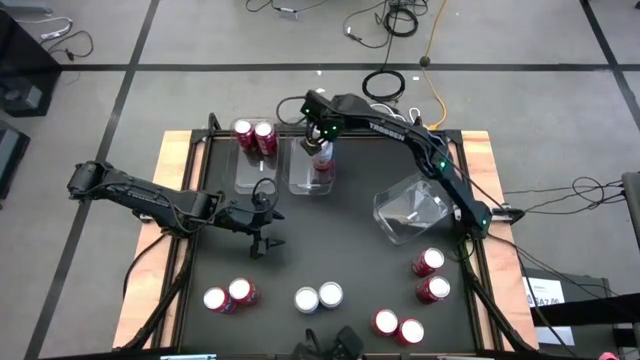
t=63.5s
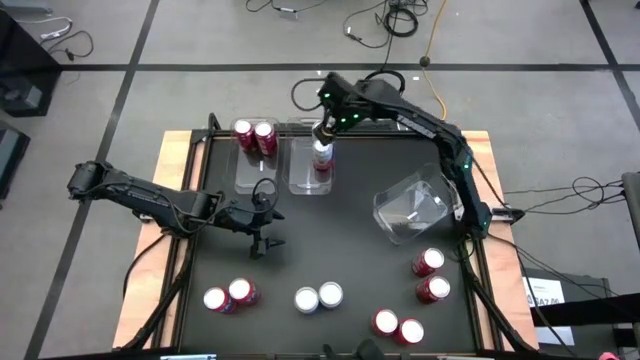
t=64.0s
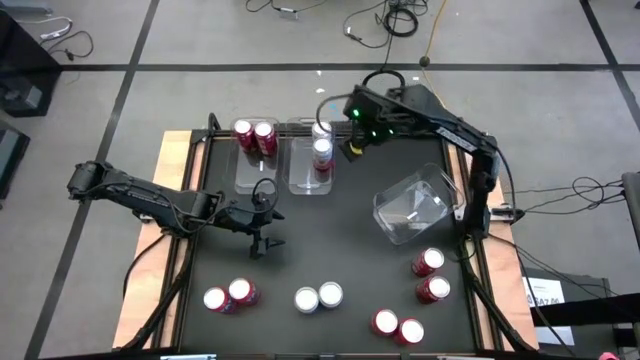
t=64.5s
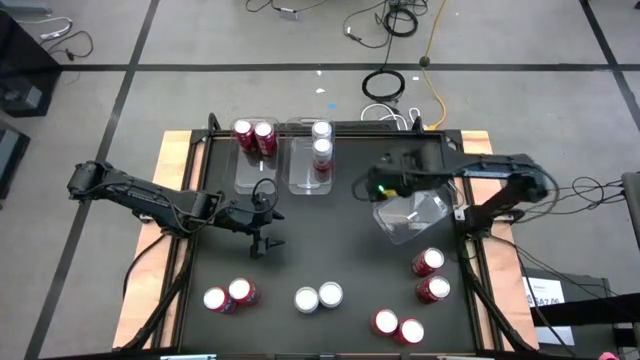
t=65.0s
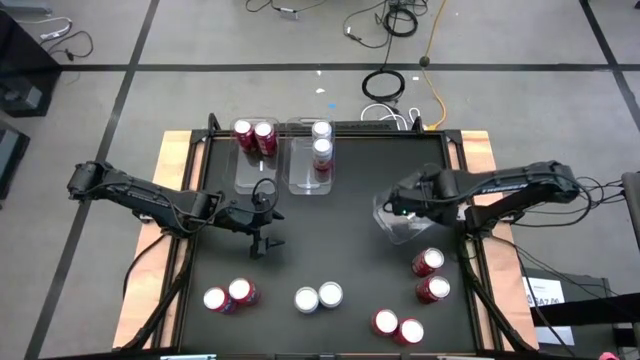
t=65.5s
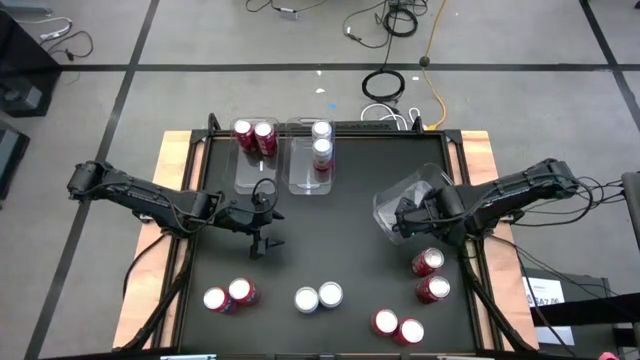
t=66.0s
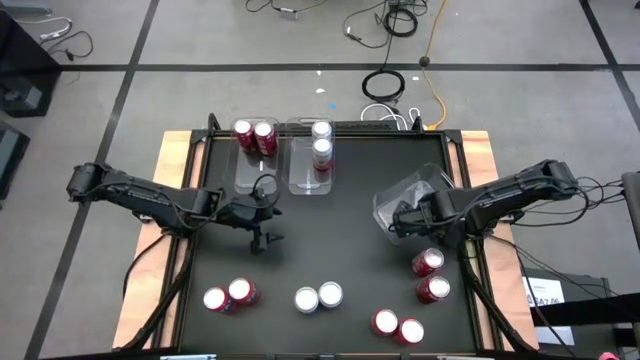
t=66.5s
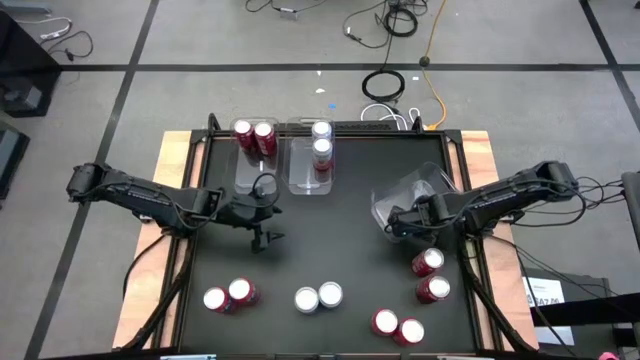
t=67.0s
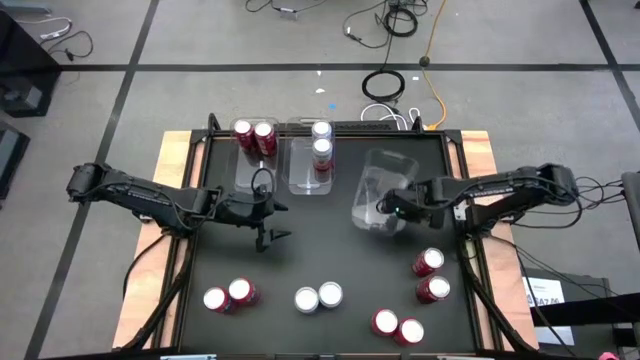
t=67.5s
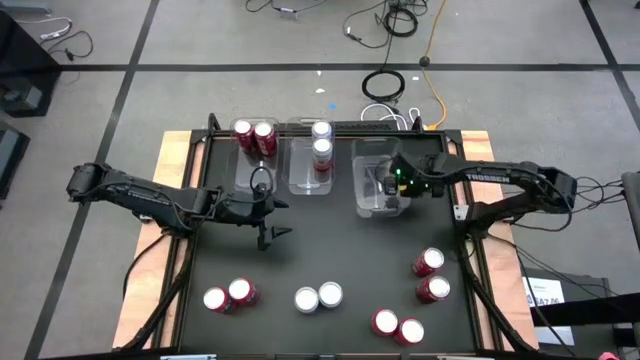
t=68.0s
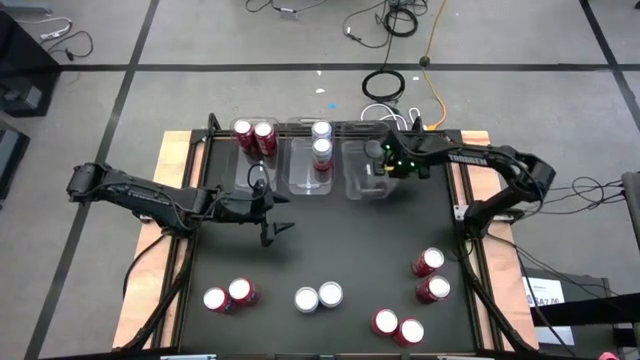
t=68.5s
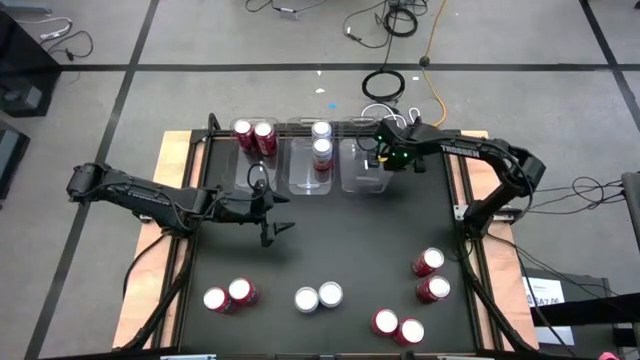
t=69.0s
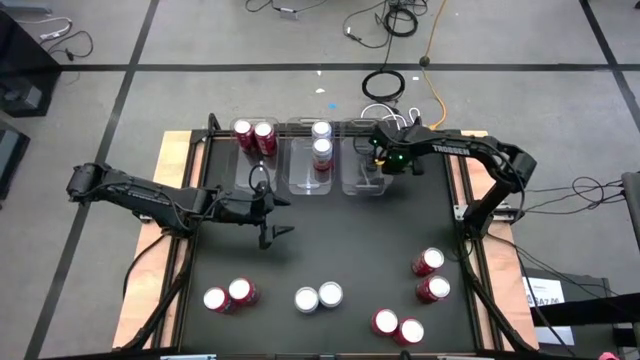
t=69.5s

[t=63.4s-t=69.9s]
Task: Sort soda cans
Move the transparent bin to the top right of the table

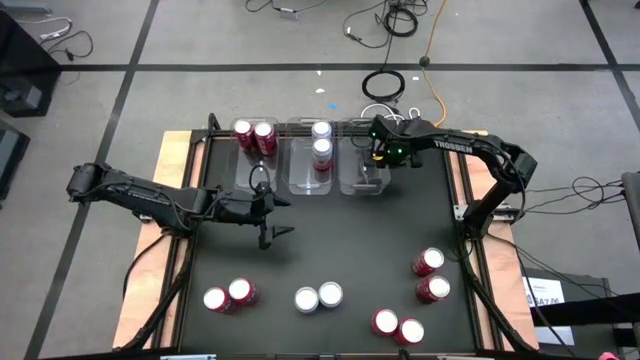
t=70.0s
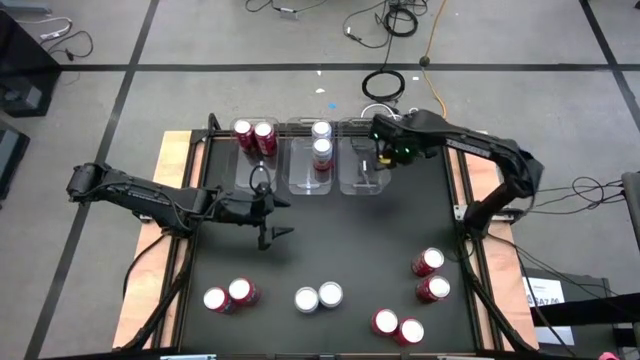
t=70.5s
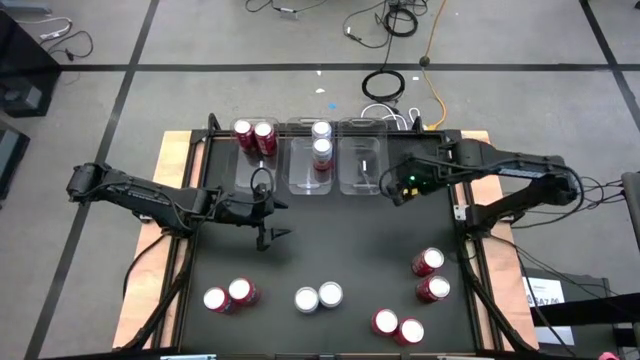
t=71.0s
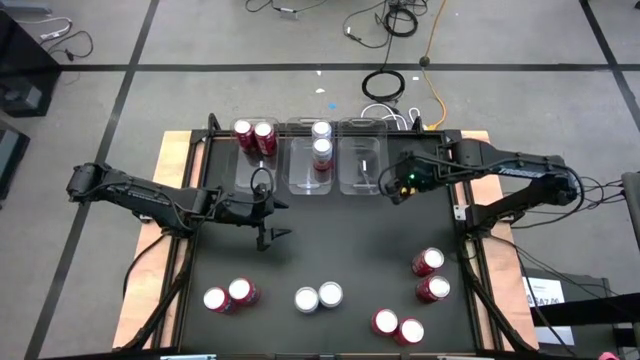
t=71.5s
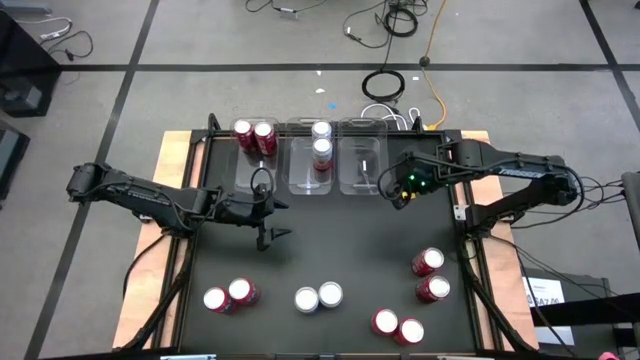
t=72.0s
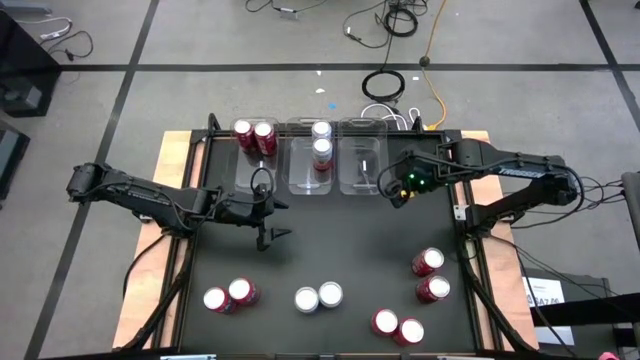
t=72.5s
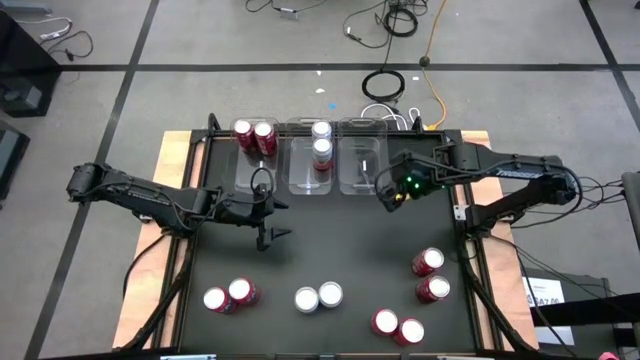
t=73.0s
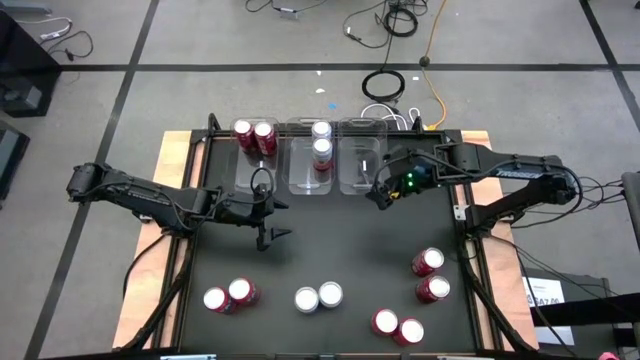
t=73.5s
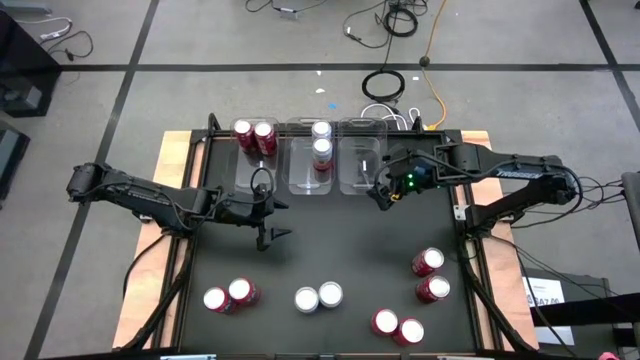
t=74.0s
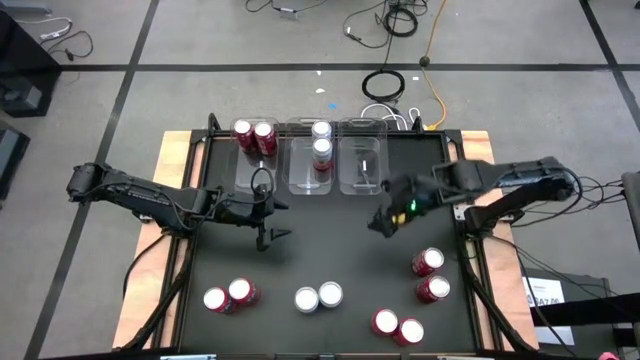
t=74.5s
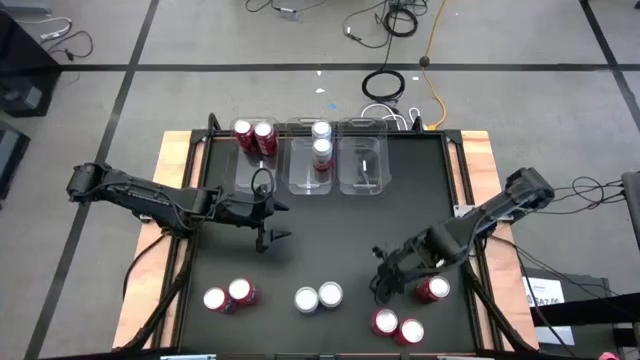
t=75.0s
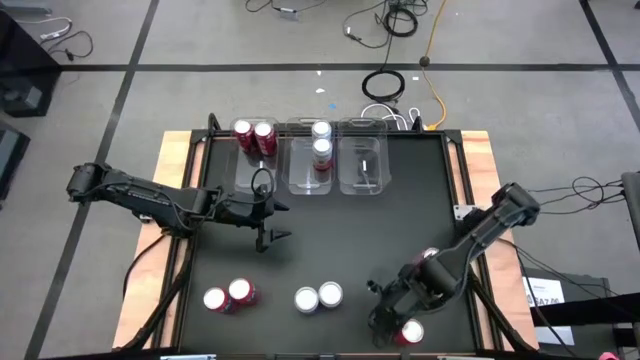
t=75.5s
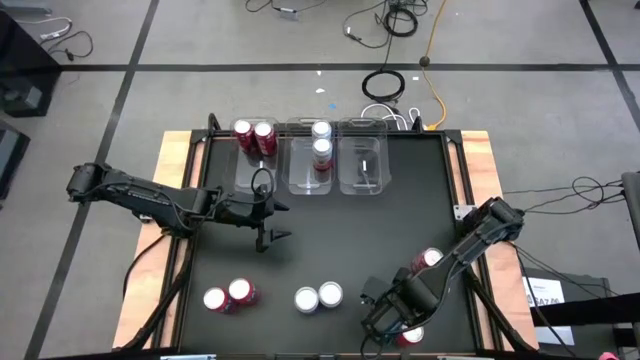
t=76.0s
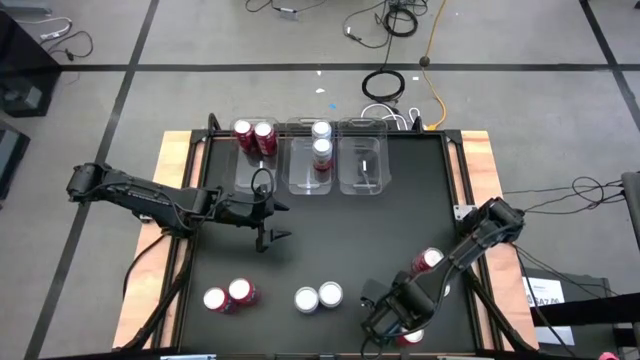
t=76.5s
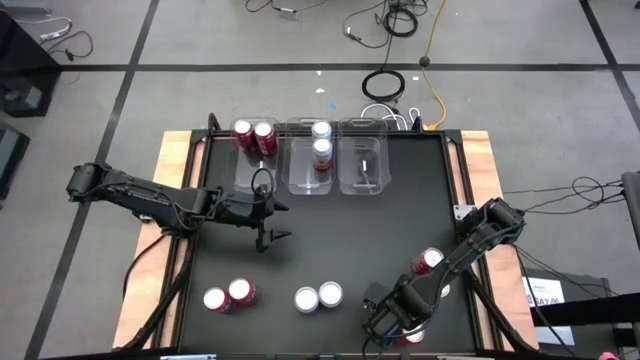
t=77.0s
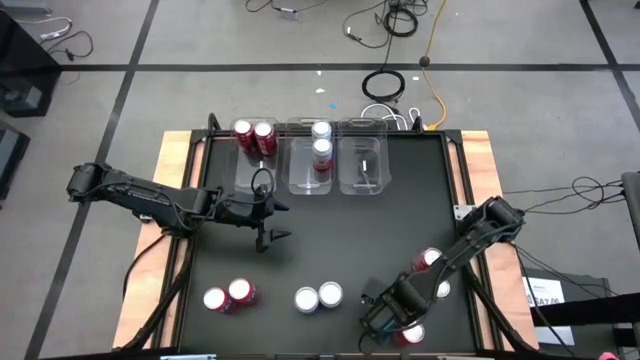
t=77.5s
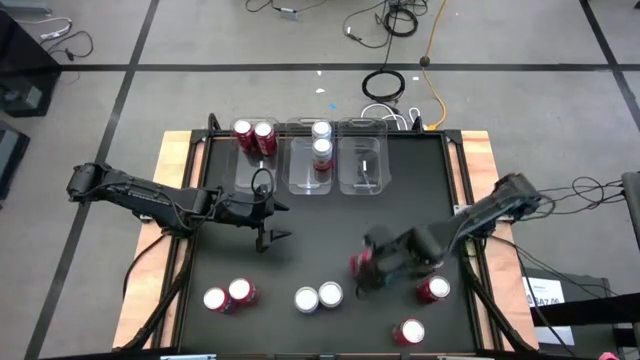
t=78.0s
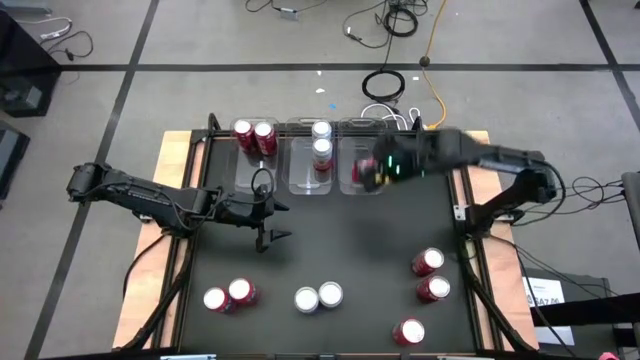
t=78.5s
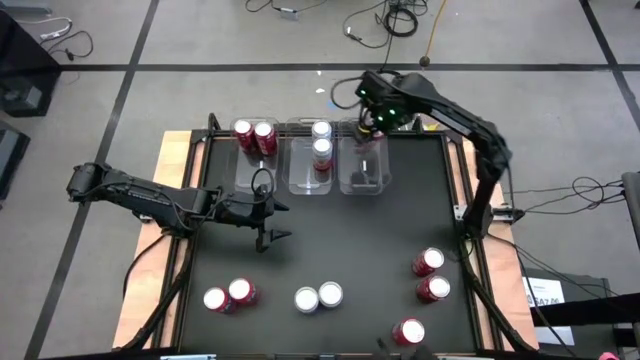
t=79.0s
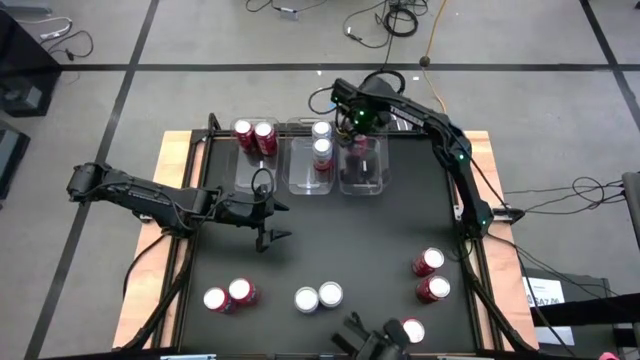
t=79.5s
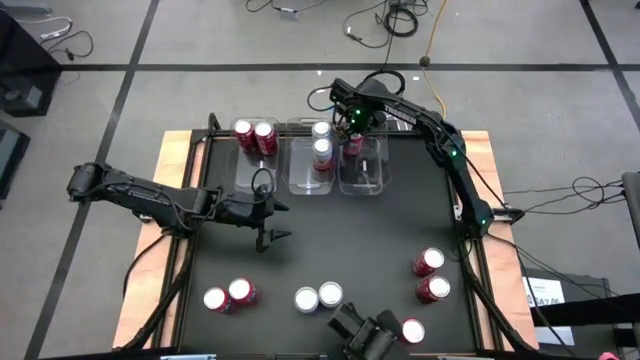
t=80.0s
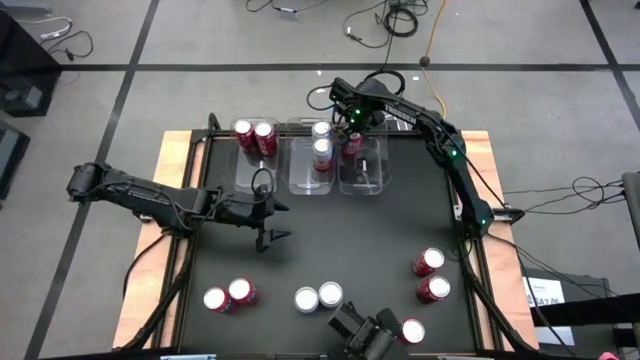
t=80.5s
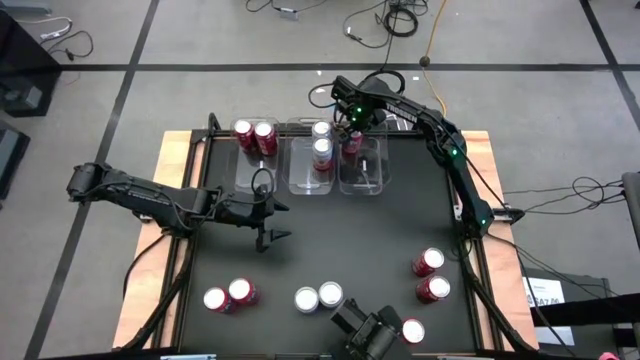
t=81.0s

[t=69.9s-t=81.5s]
Put the middle right orange soda can into the right transparent bin

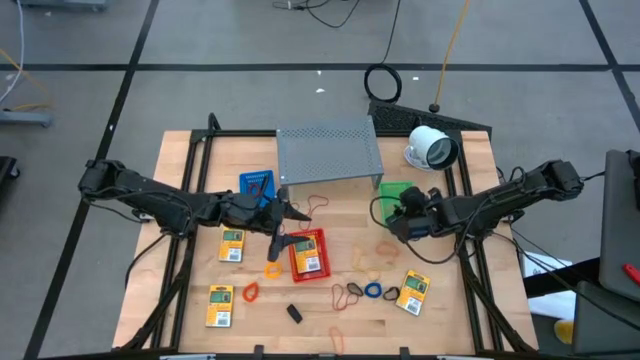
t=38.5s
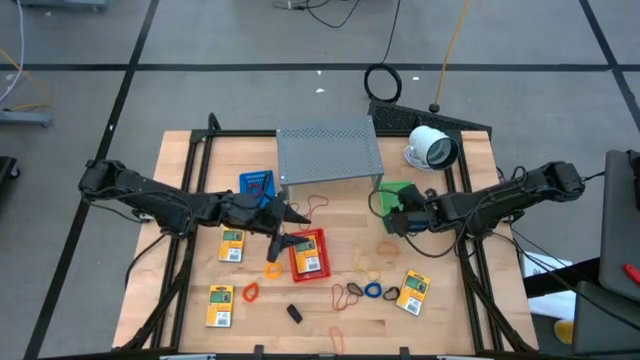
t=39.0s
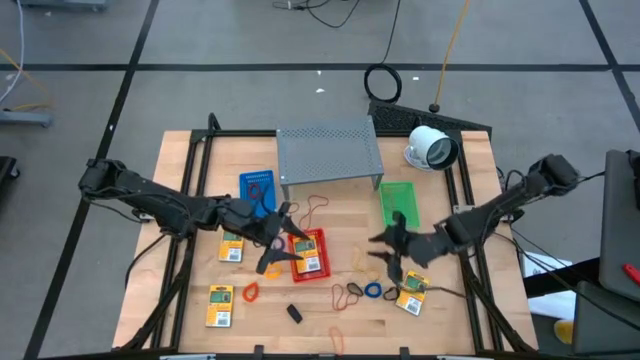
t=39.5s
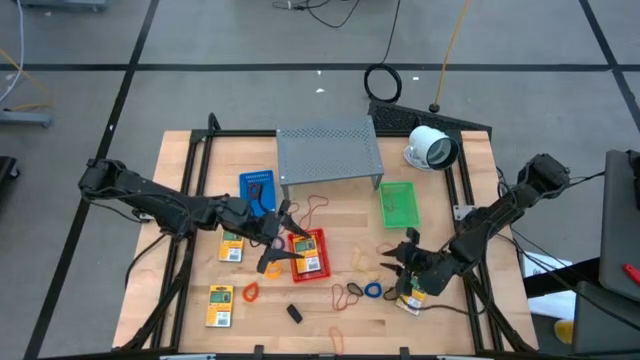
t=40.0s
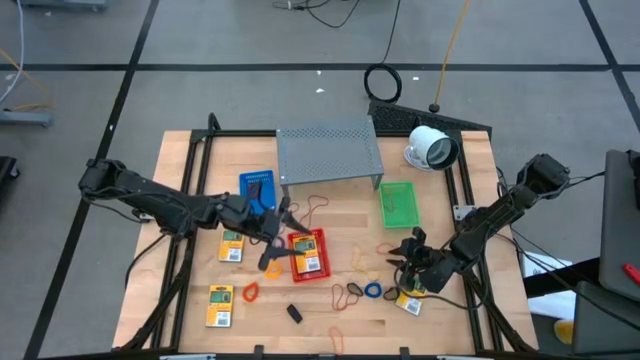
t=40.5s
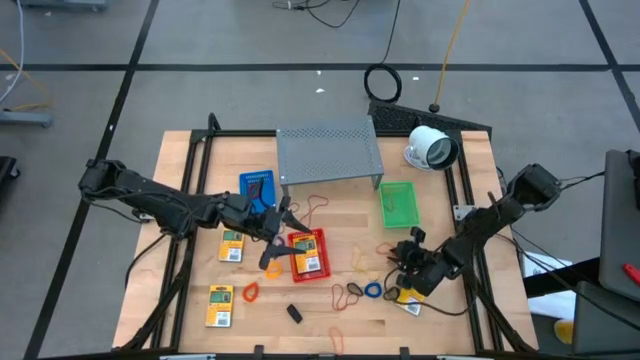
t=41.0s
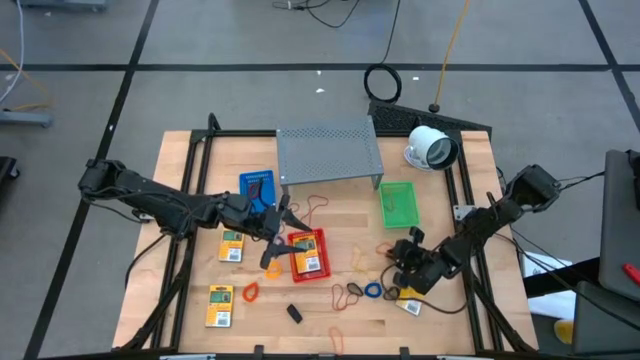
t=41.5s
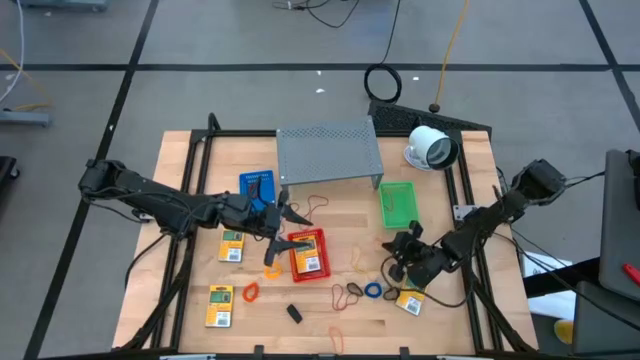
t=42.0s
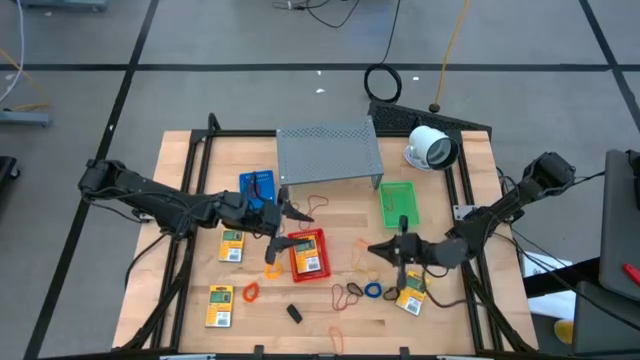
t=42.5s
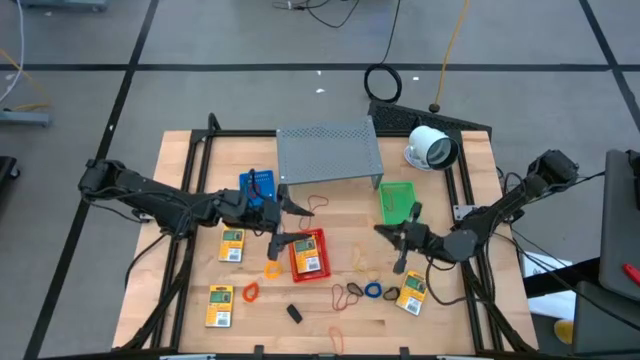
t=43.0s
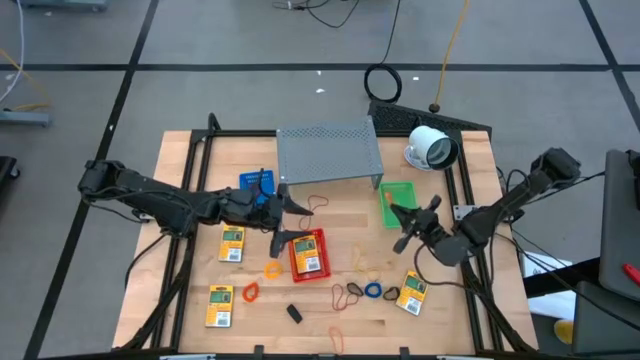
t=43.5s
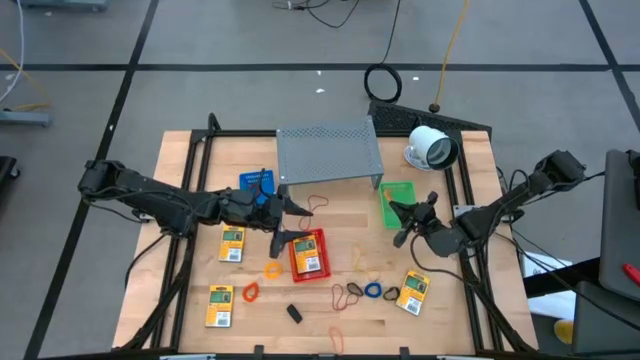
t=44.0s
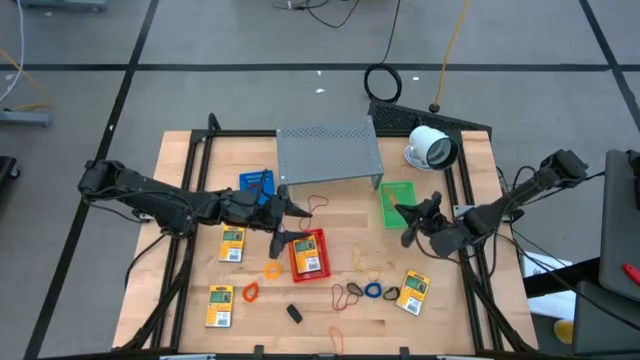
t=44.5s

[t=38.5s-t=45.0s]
Task: Pick & Place Office Desk Supplies
Put the top orange rubber band into the green bin
